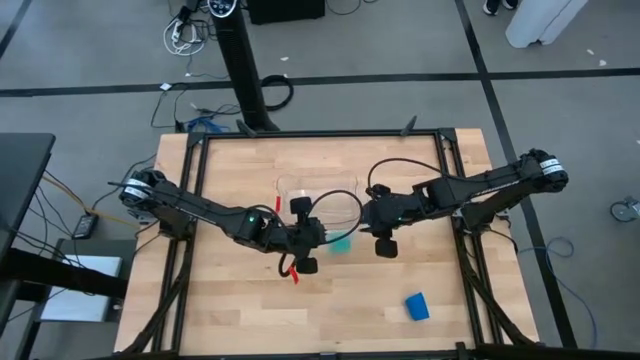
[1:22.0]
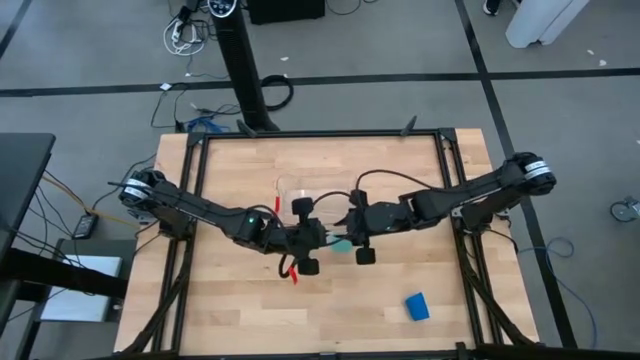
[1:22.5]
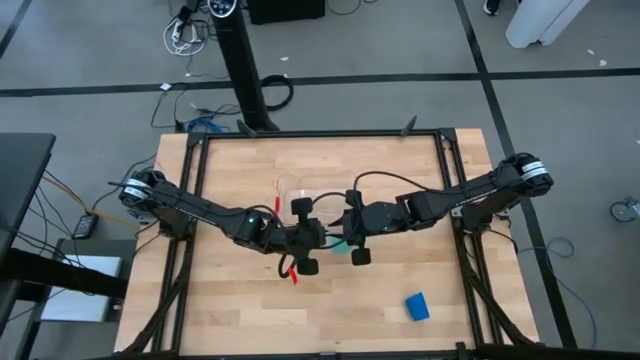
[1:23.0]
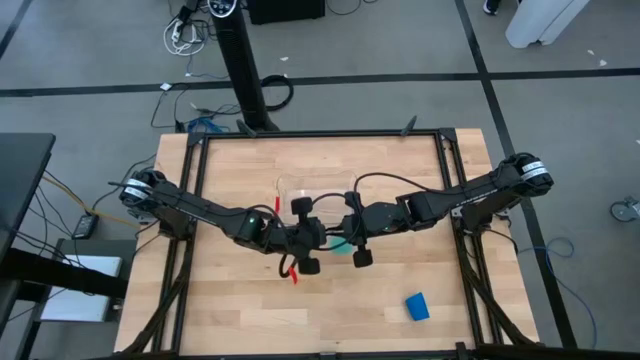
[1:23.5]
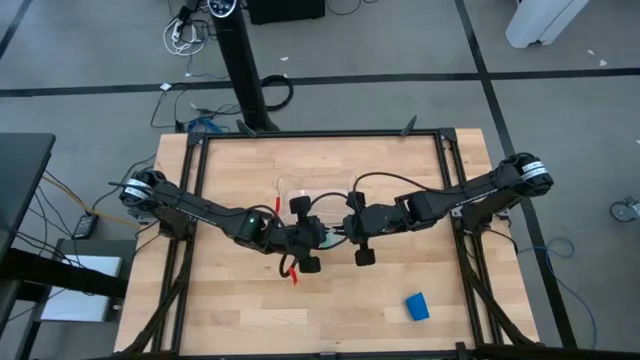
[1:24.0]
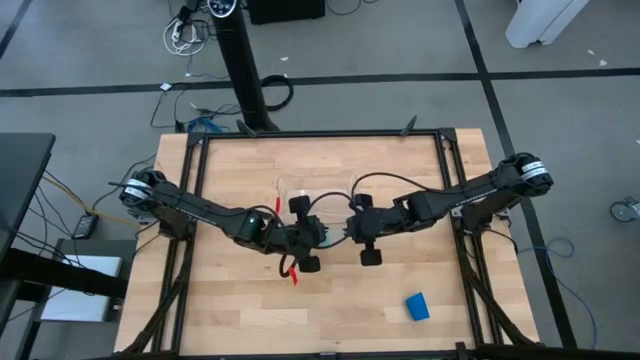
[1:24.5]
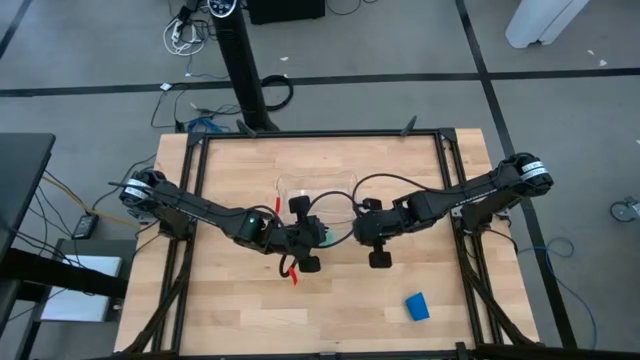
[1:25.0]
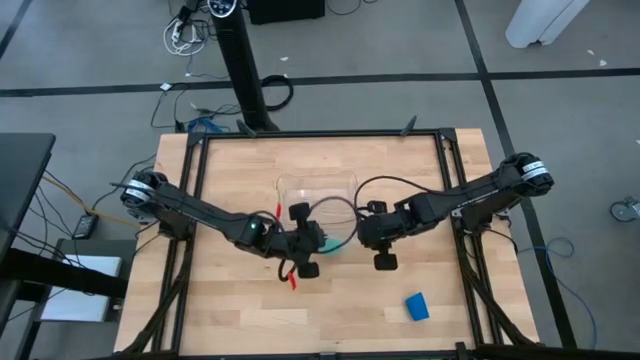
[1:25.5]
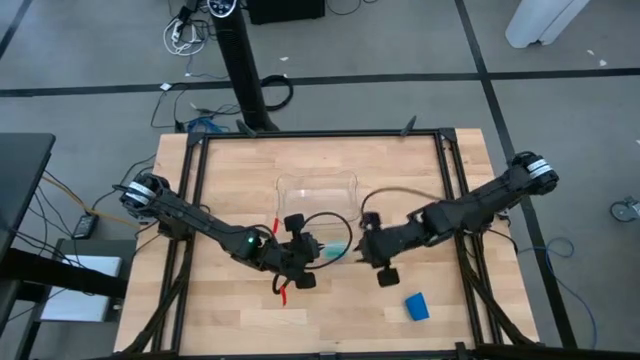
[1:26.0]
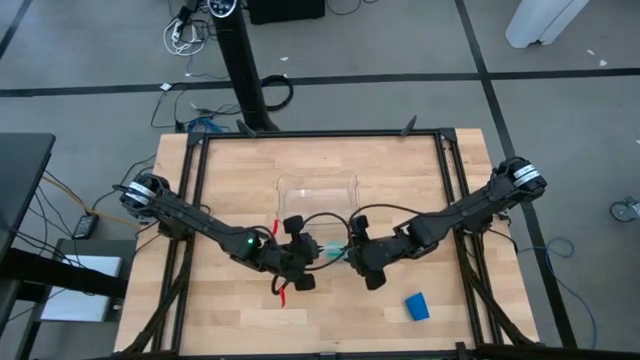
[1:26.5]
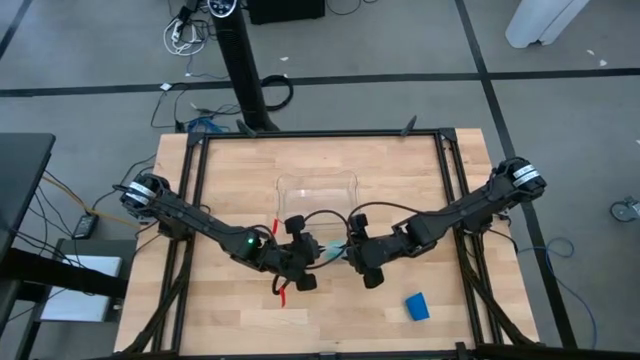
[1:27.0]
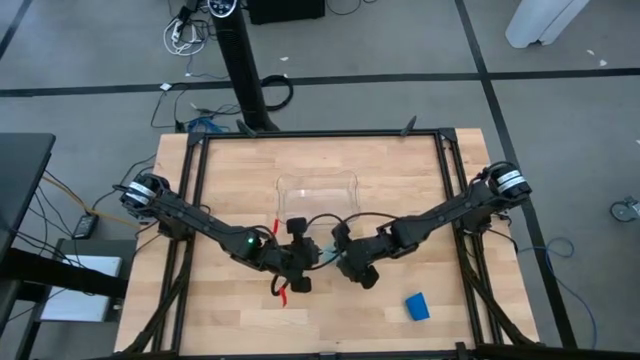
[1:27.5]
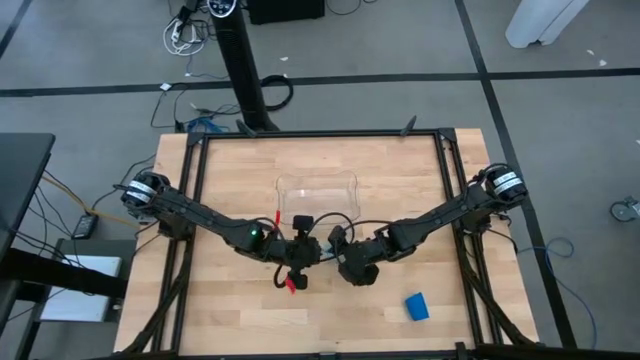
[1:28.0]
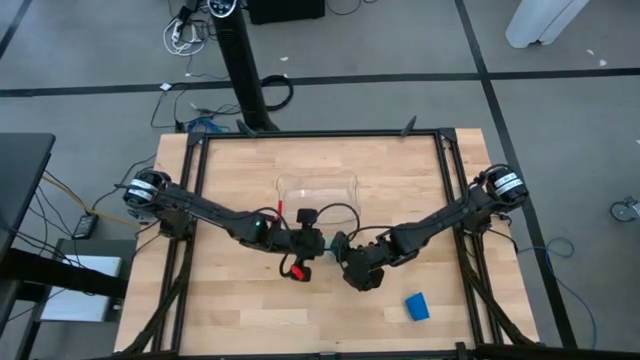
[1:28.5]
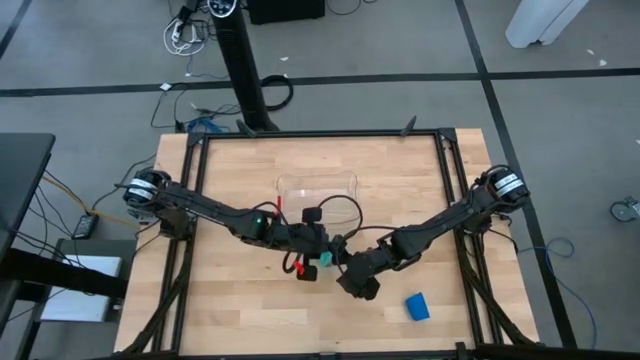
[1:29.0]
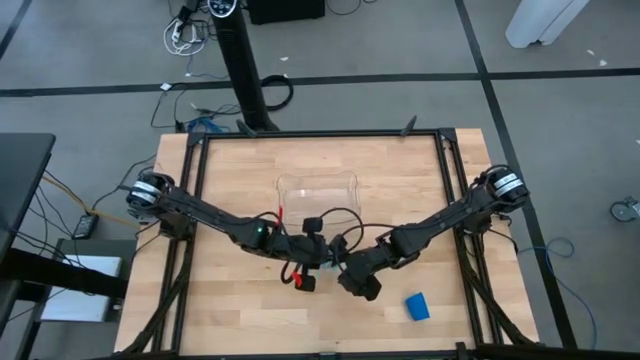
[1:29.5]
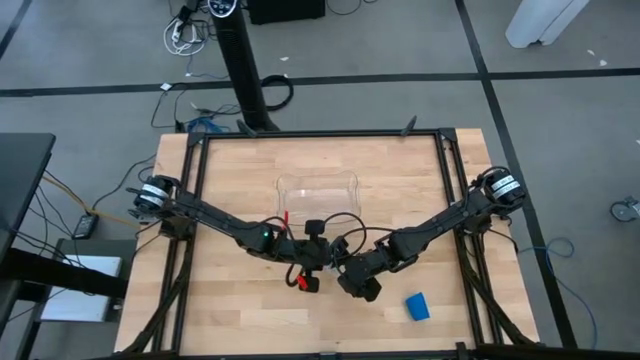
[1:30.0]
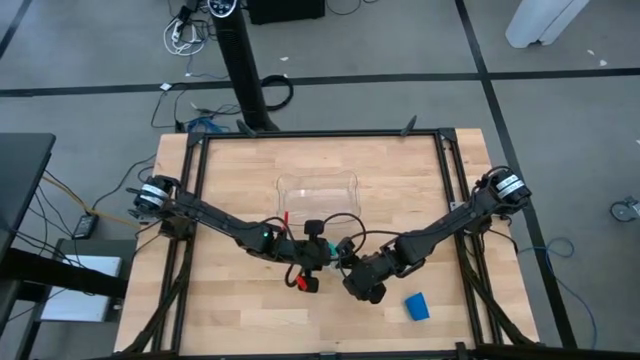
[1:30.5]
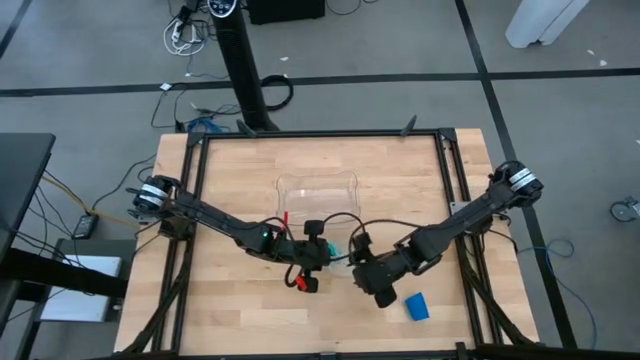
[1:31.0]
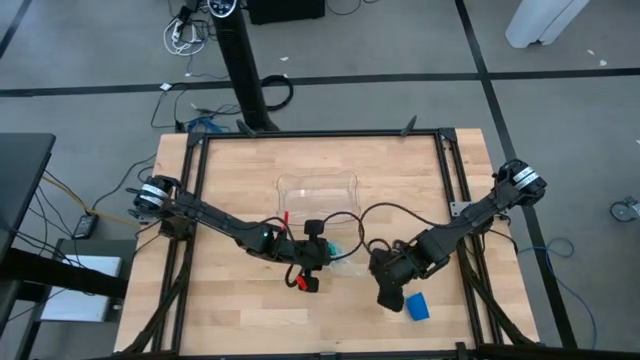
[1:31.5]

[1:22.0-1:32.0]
Task: Roll bandage
Open the transparent zip bag

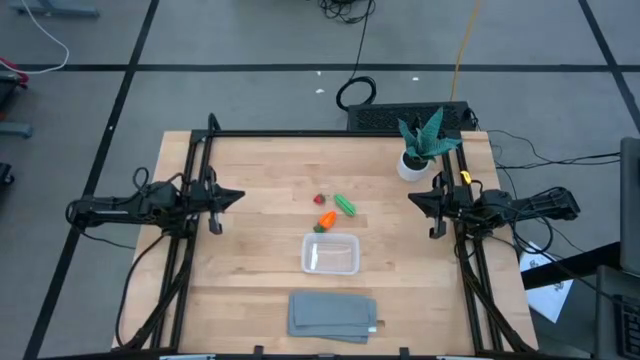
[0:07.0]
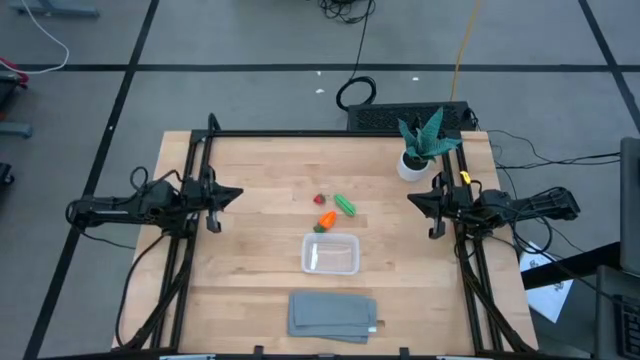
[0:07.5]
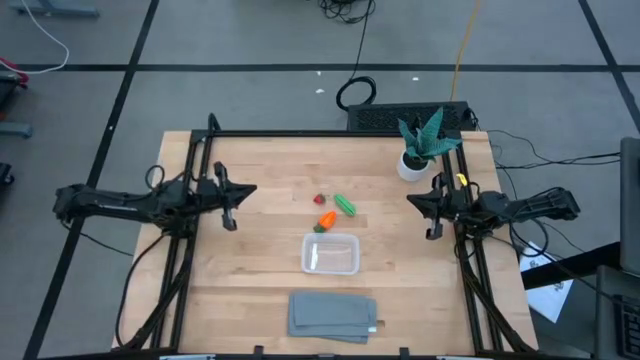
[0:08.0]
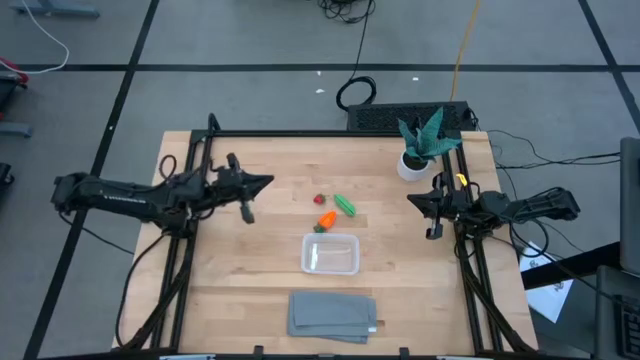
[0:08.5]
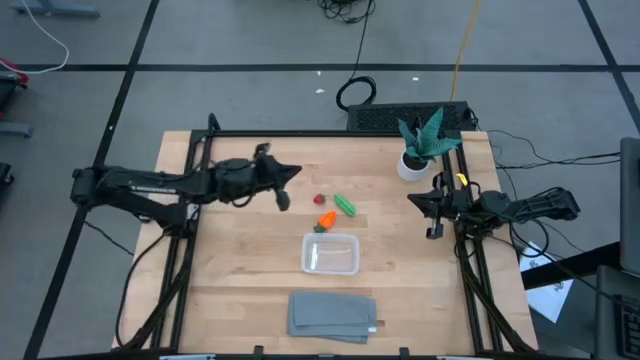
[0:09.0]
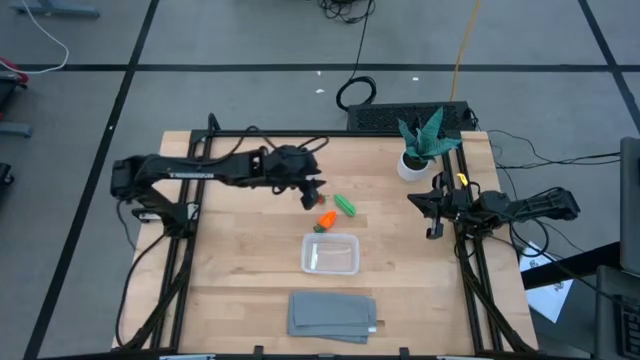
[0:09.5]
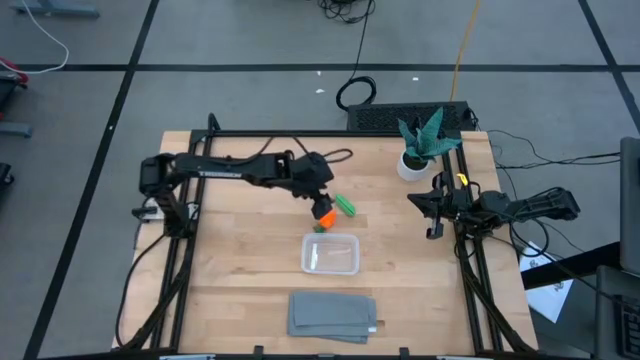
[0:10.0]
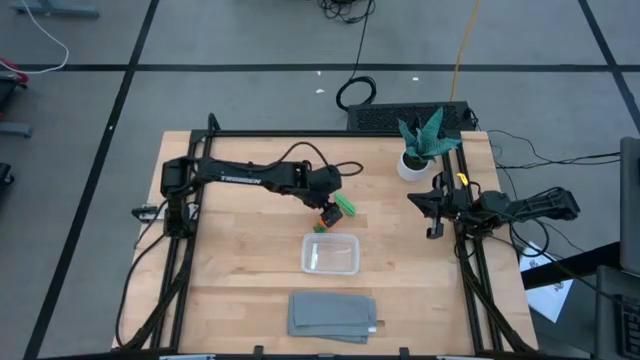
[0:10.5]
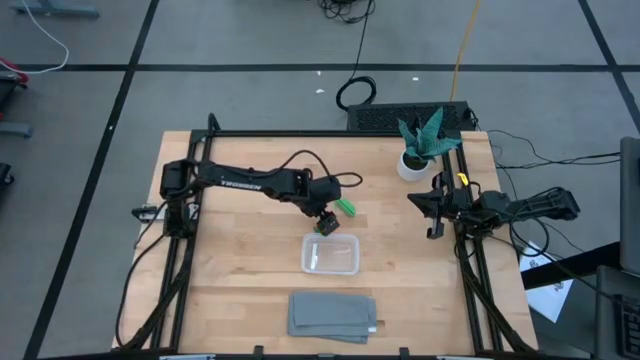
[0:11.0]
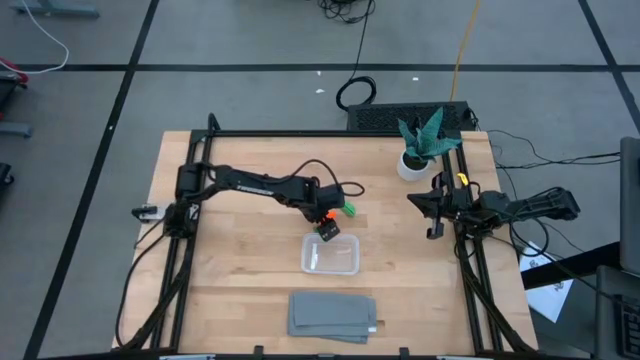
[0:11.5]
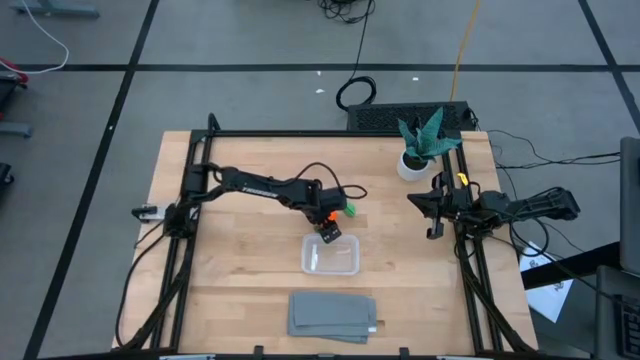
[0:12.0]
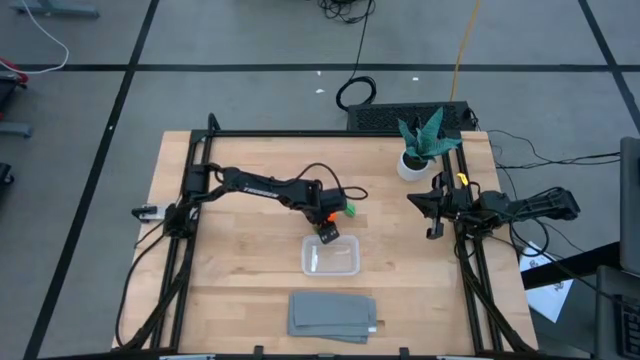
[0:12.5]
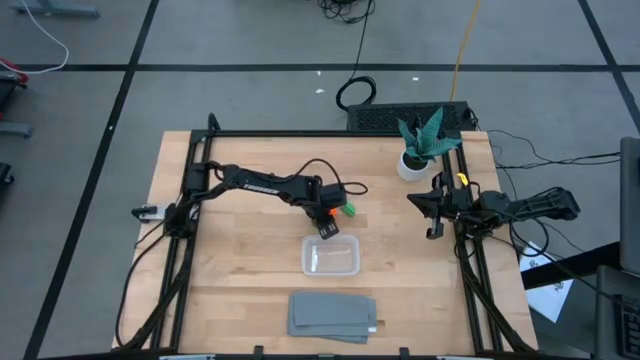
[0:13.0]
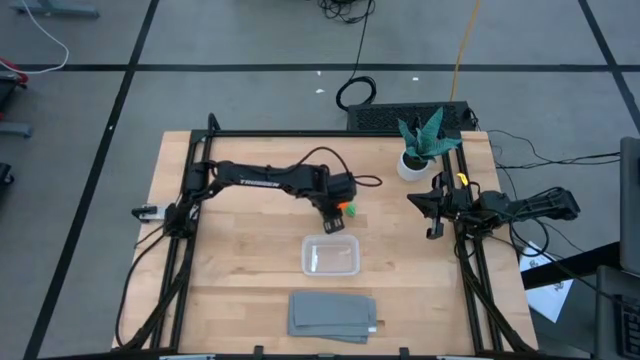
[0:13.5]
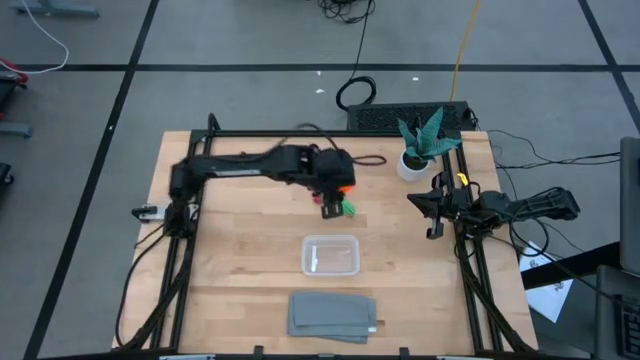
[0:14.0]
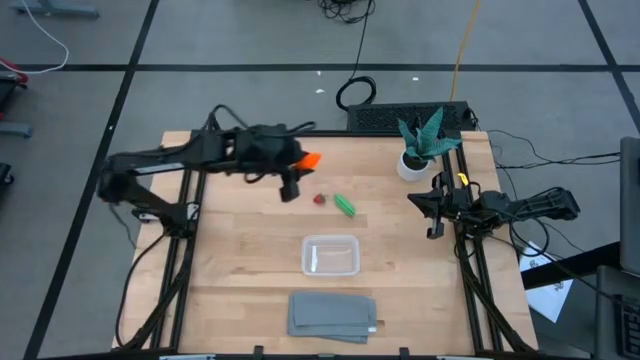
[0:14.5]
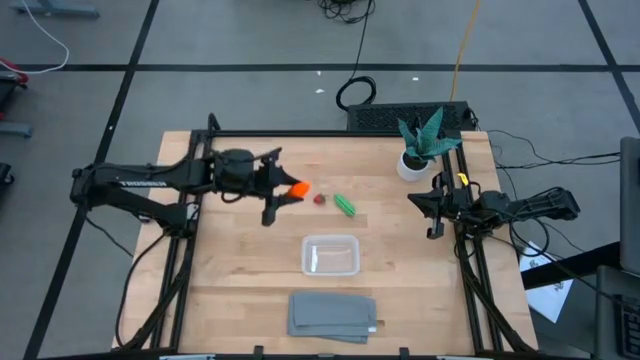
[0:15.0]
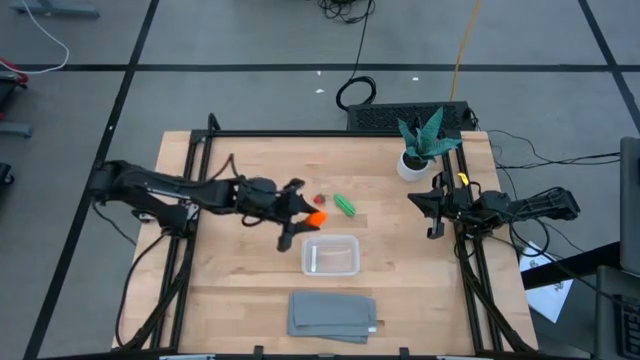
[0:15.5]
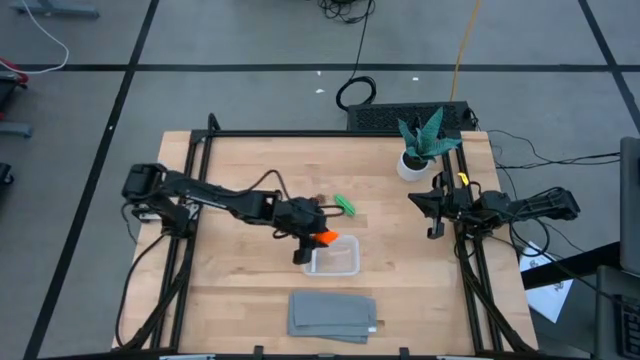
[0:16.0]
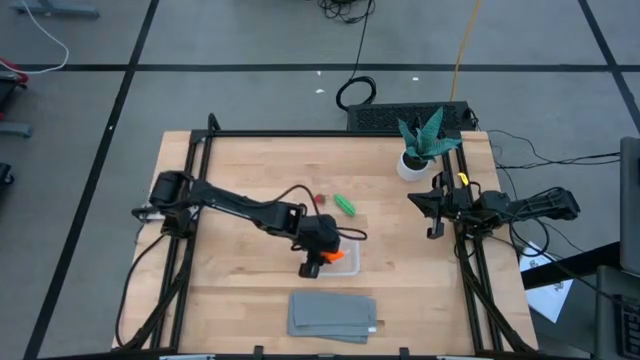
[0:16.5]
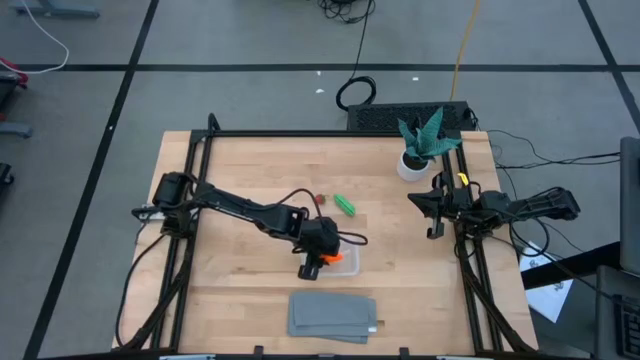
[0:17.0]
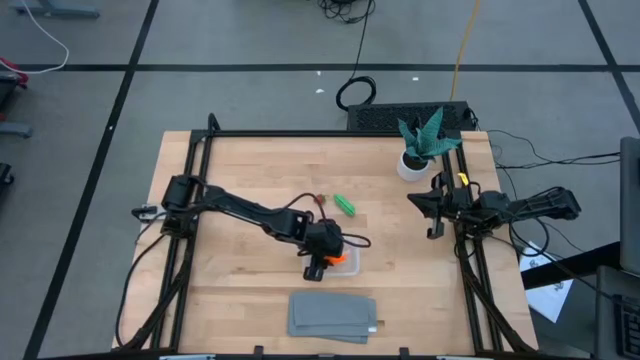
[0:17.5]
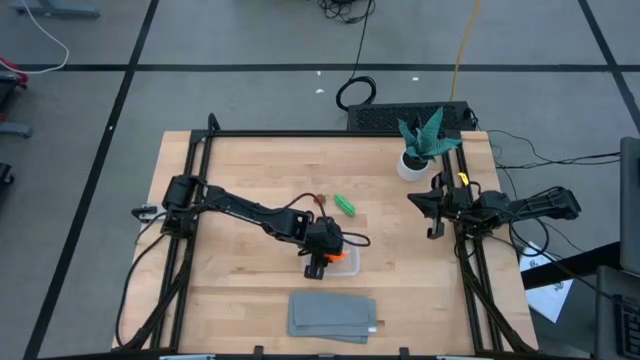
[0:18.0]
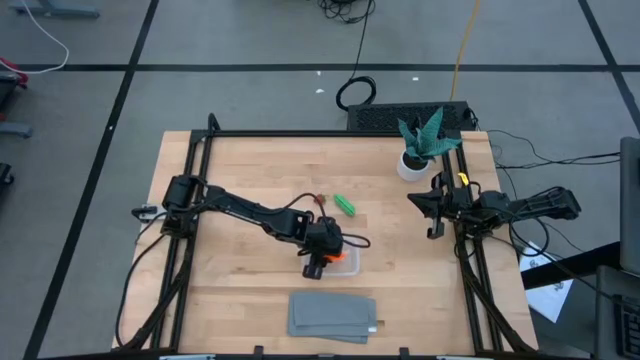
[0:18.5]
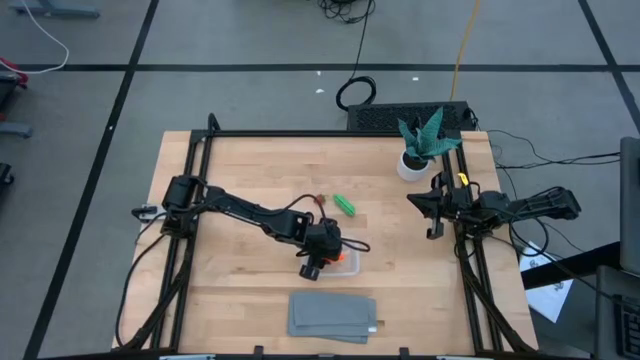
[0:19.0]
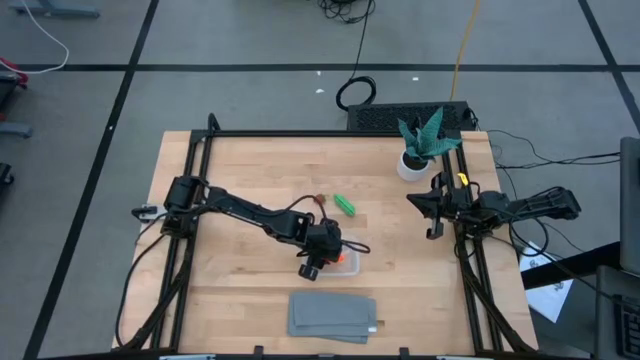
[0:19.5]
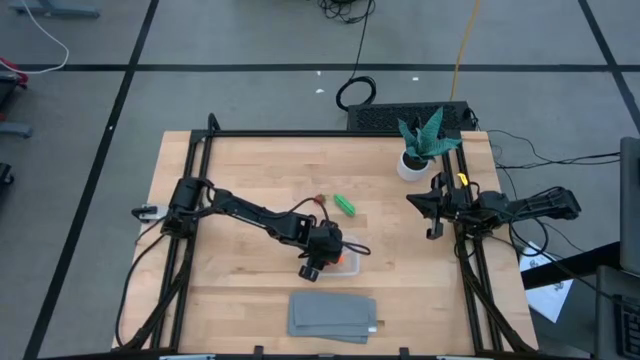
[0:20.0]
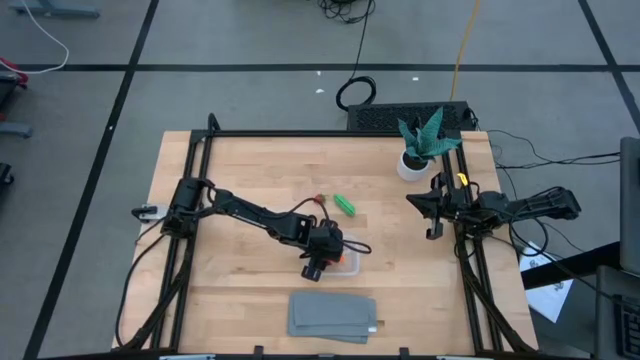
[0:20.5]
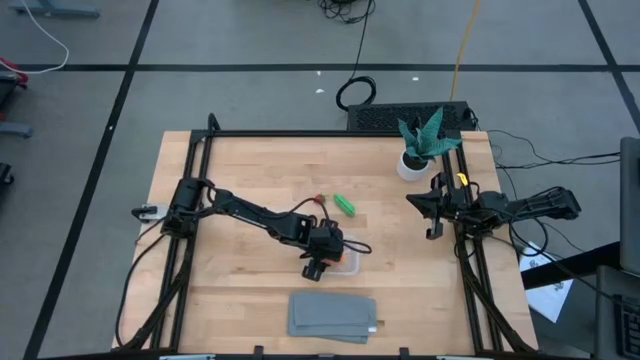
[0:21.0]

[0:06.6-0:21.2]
Task: Pick and placing Produce into tupperware
Put the carrot into the transparent bin
